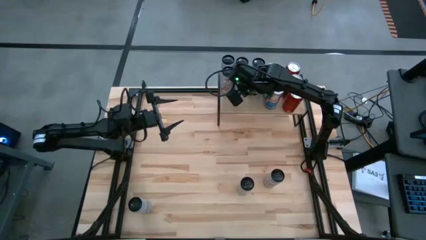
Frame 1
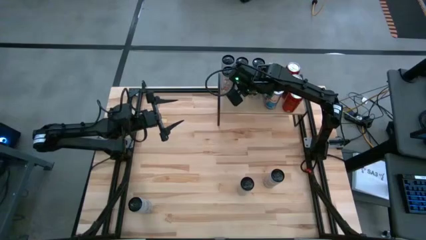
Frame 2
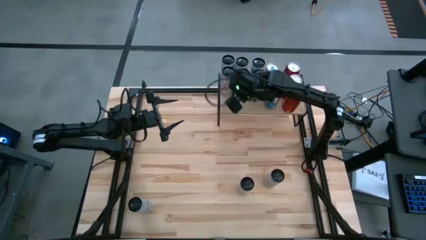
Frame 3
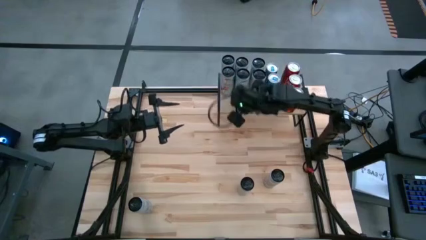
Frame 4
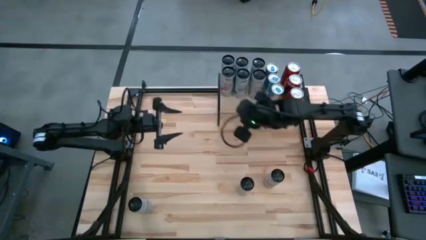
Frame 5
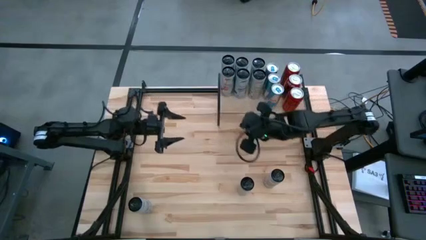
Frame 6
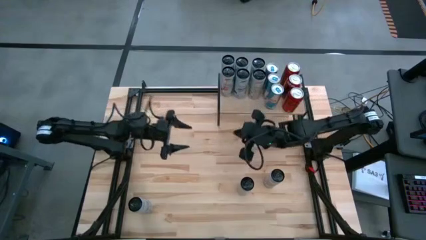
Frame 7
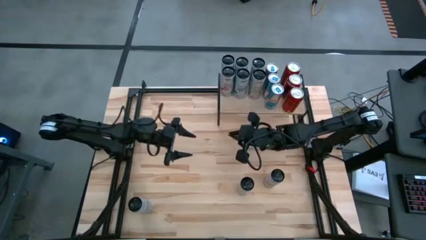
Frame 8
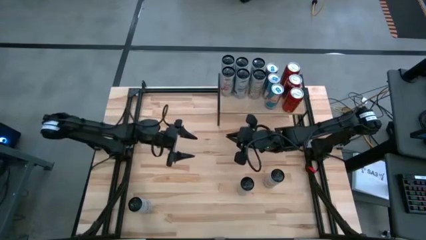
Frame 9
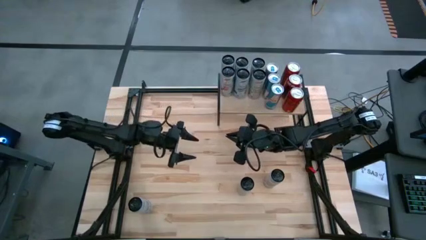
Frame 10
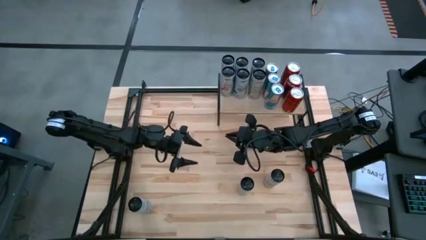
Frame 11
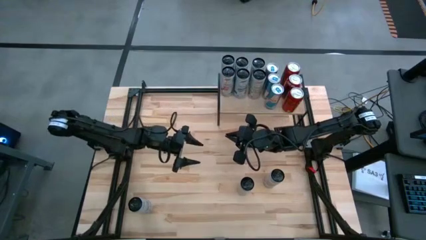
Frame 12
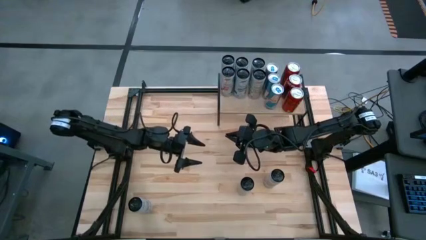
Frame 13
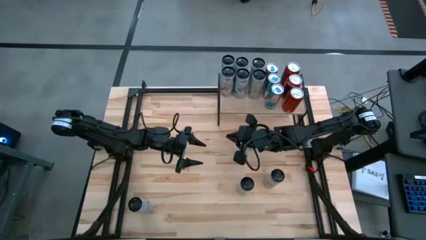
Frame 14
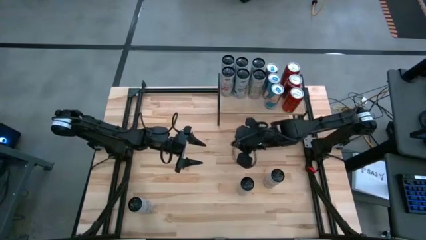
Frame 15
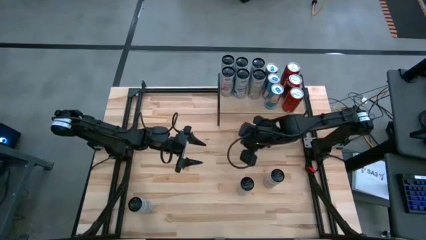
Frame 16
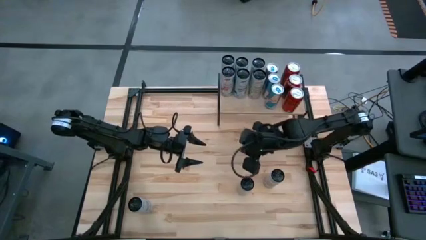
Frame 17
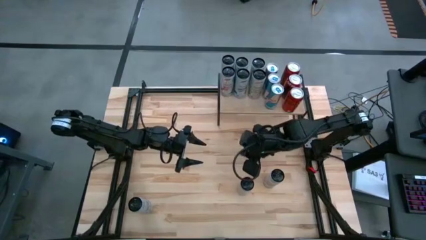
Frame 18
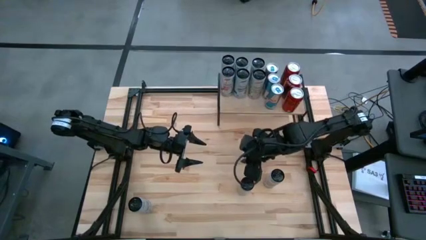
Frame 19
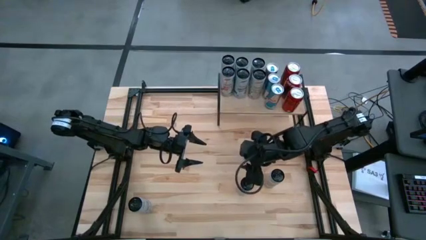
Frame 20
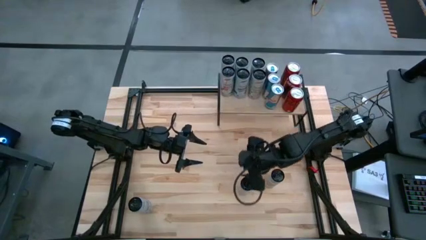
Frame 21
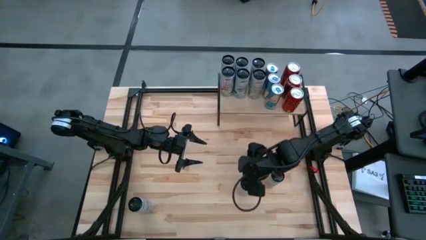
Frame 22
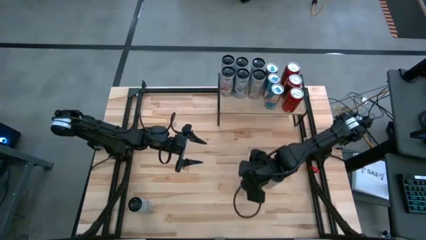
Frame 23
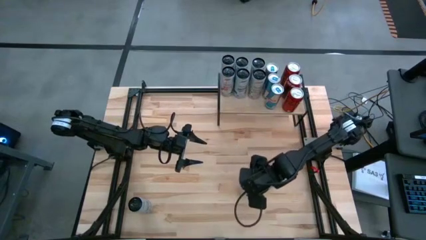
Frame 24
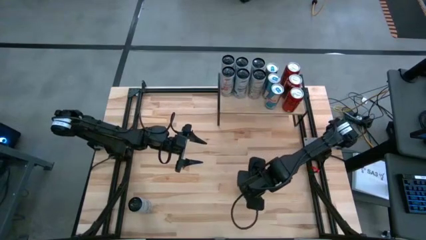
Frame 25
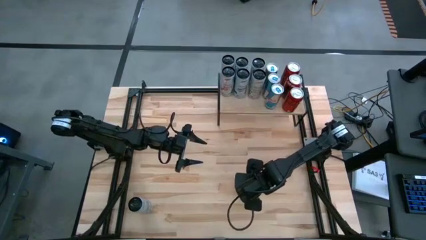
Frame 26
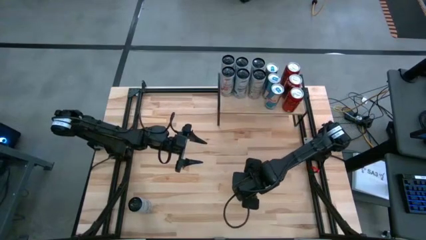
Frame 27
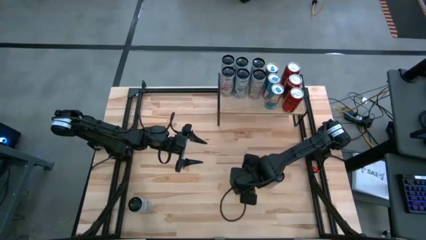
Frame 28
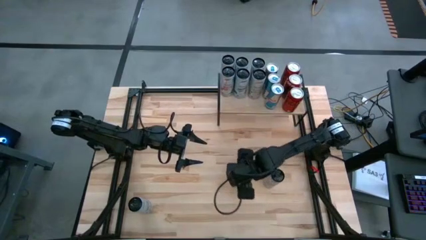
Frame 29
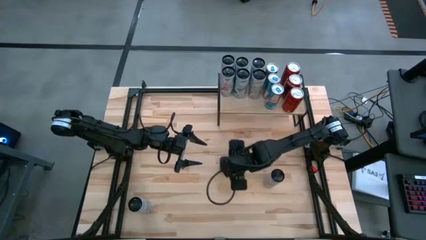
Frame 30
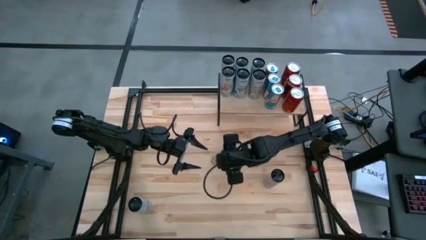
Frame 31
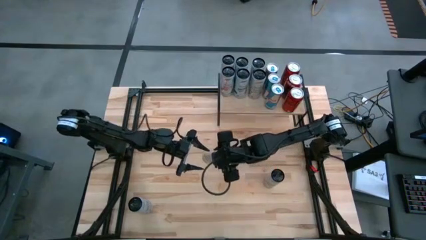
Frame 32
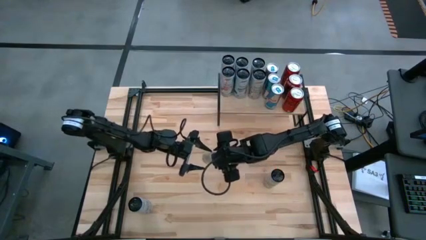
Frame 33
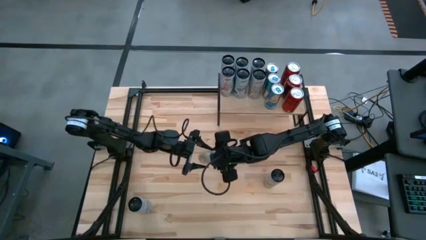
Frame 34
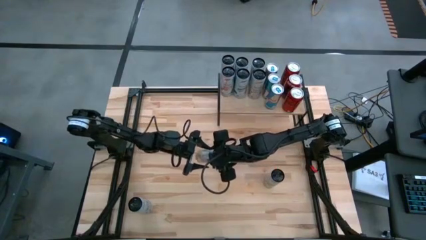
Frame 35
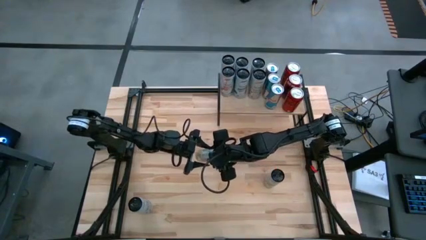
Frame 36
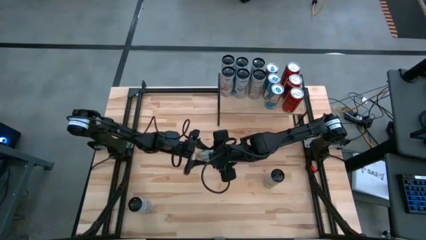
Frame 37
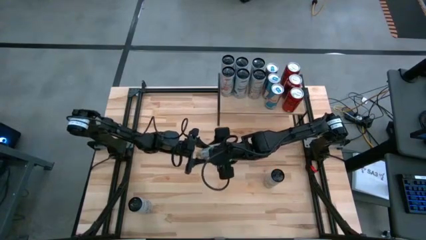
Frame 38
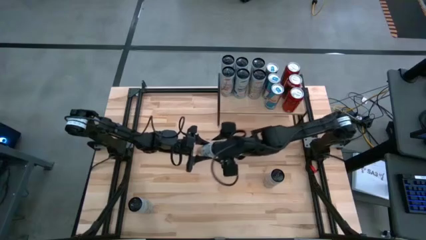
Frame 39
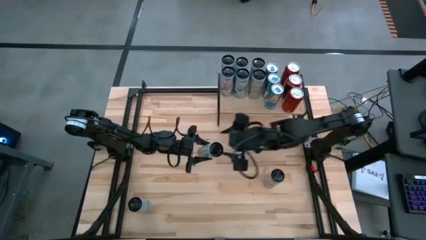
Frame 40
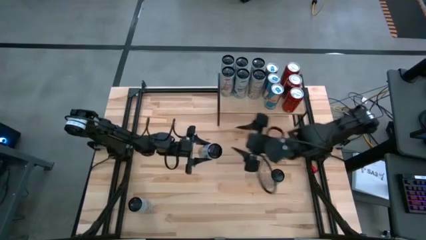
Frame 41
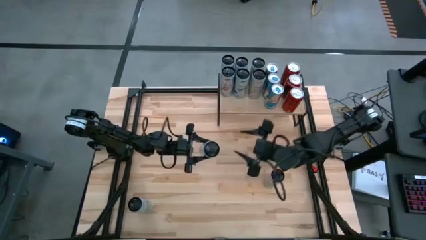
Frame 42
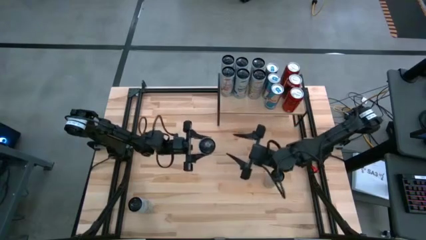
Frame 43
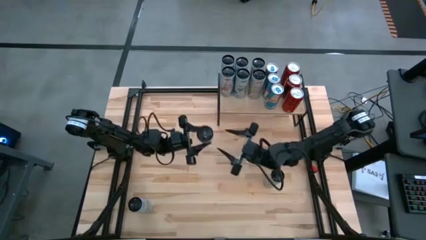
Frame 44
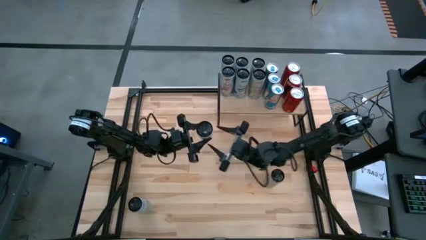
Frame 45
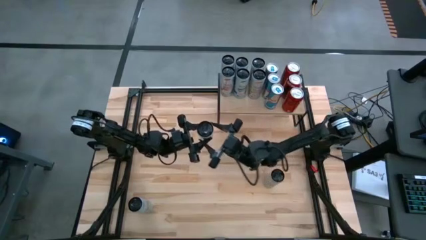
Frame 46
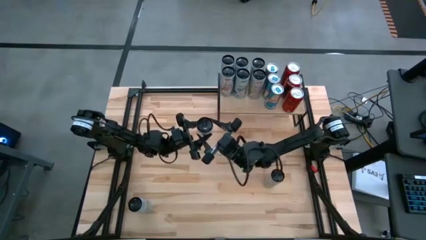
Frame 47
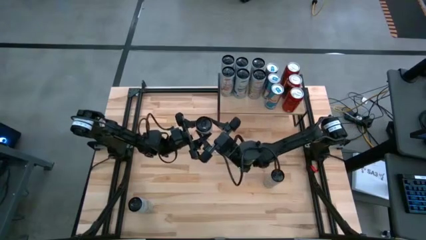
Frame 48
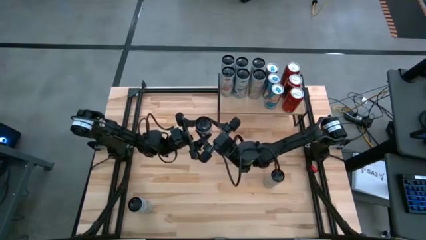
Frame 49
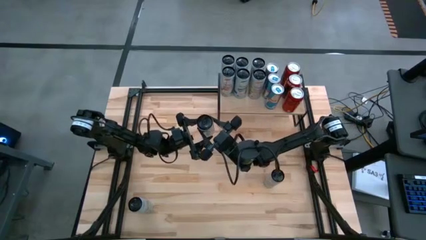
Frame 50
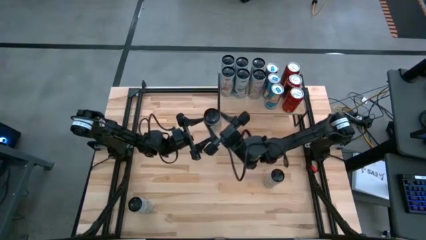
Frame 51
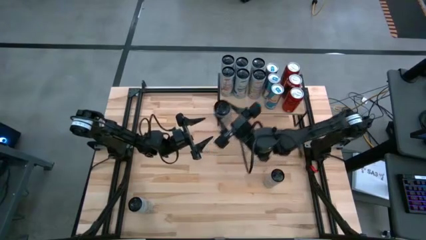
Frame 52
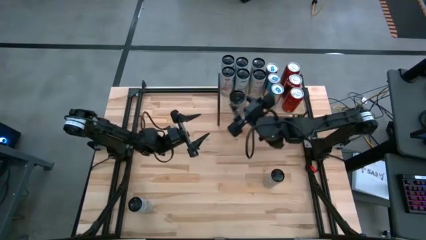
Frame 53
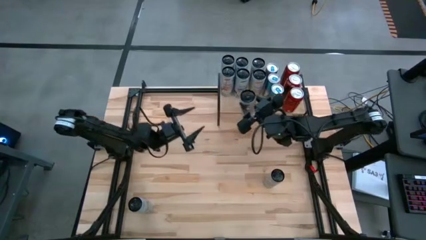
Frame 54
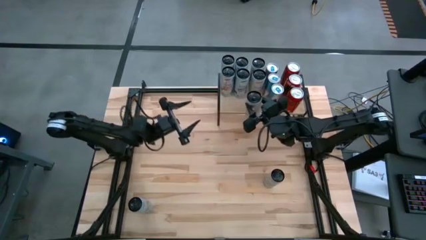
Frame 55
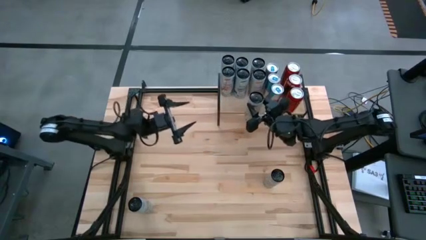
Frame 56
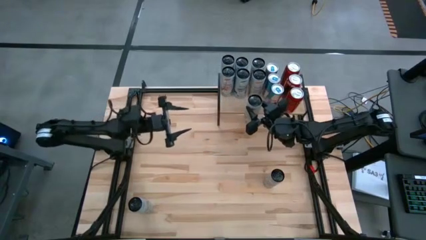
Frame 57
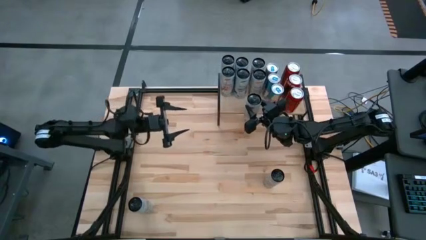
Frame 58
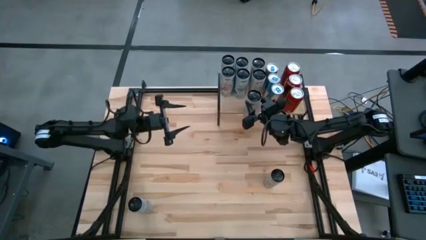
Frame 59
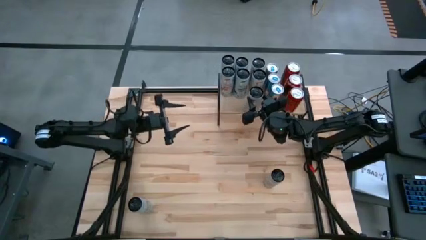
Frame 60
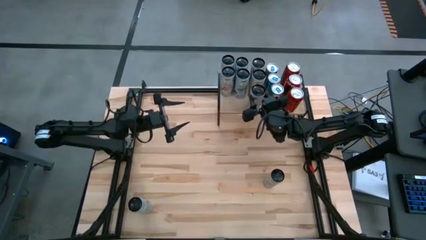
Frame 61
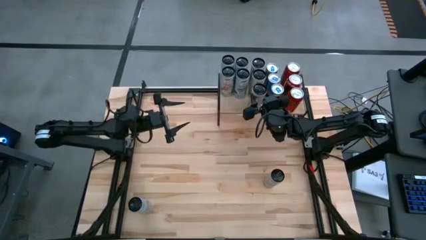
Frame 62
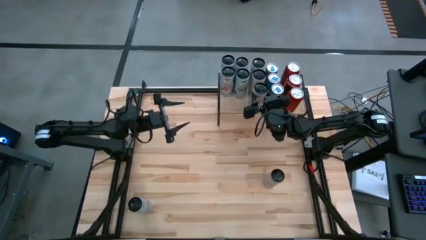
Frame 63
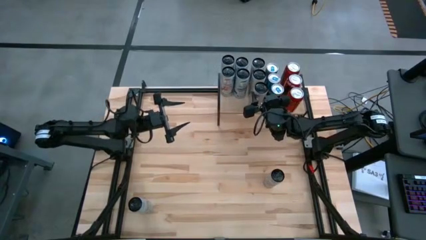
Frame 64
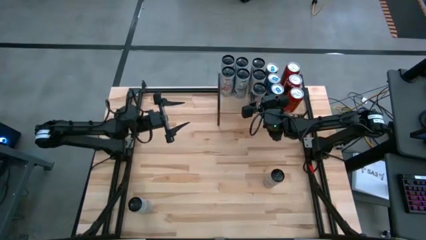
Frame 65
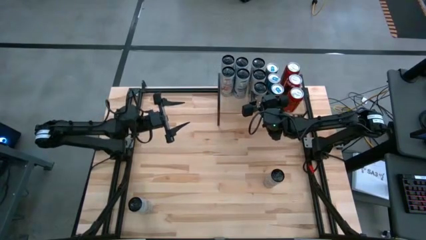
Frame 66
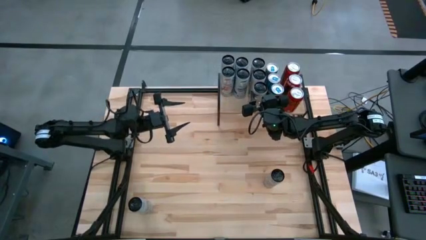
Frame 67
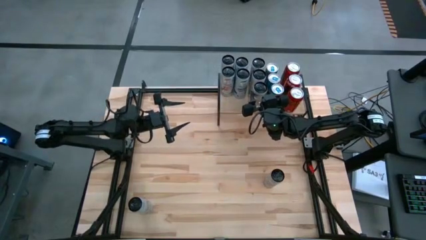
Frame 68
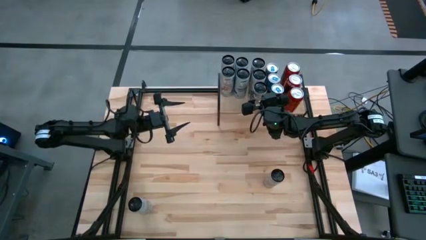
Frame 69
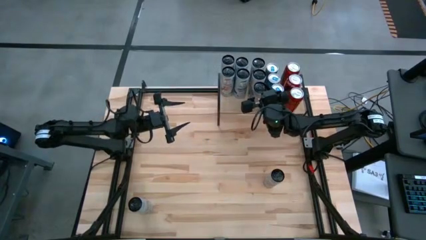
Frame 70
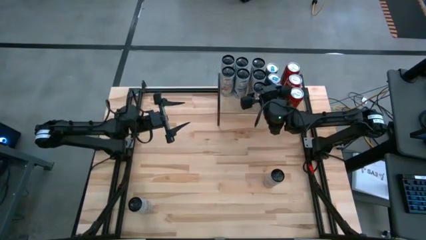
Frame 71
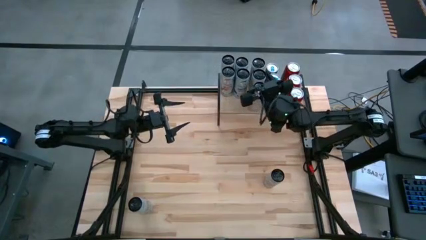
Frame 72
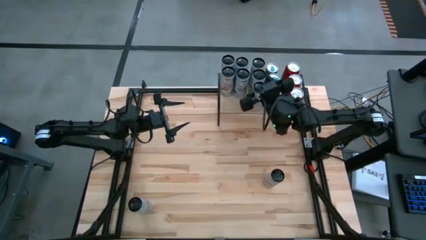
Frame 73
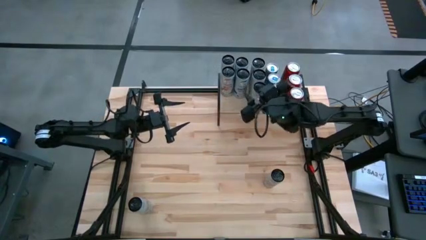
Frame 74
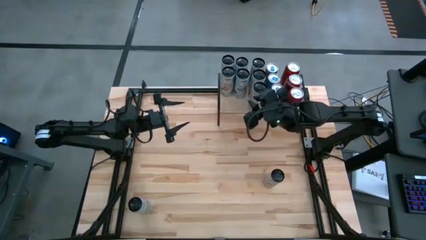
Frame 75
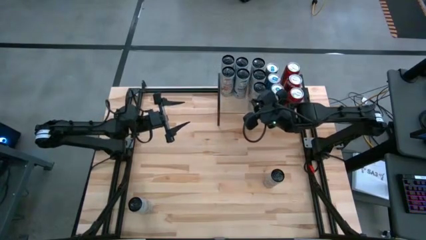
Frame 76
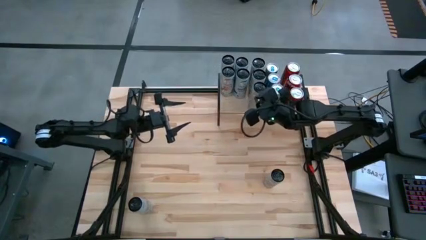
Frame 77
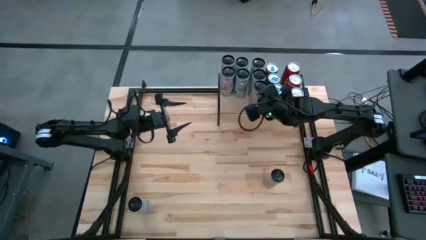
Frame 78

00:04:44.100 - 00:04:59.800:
Task: Place canned beverage on shelf
Put the white yellow soda can on the shelf aligned with the other white yellow soda cans
